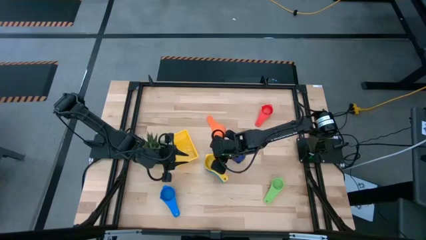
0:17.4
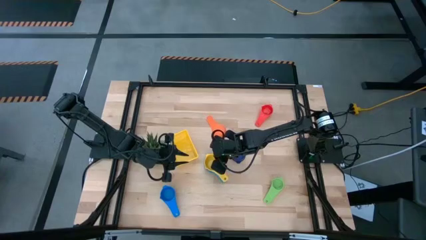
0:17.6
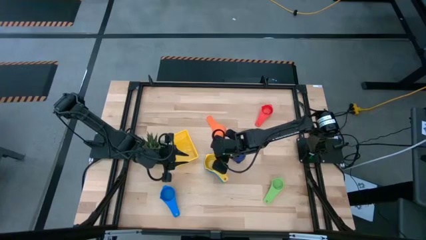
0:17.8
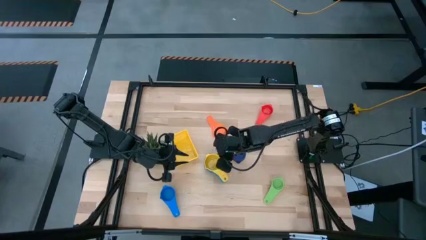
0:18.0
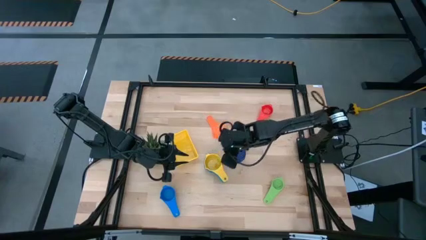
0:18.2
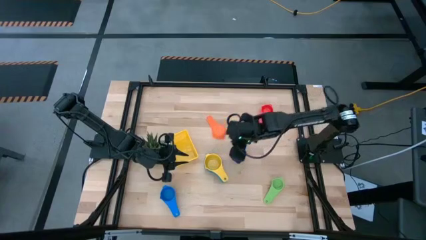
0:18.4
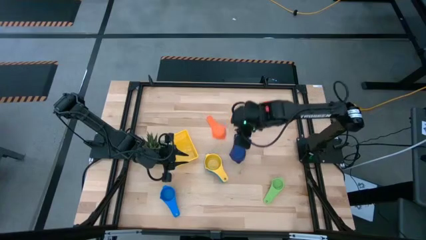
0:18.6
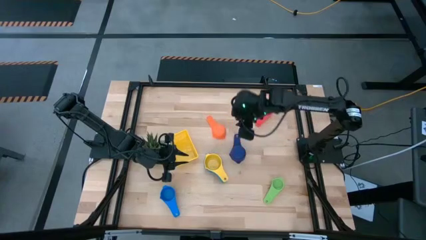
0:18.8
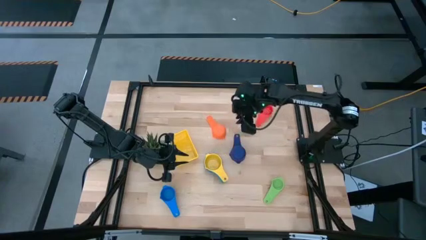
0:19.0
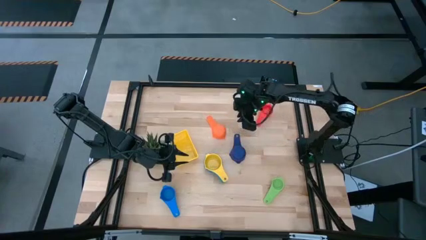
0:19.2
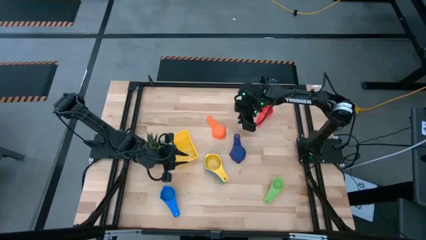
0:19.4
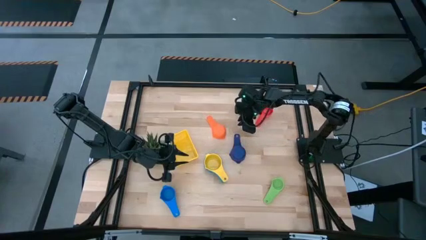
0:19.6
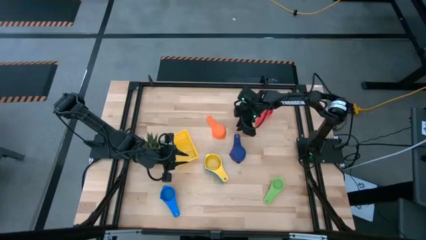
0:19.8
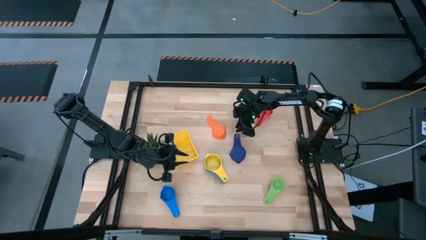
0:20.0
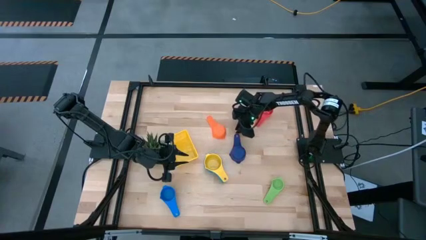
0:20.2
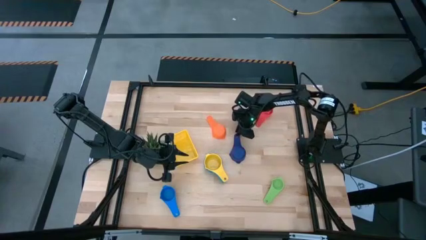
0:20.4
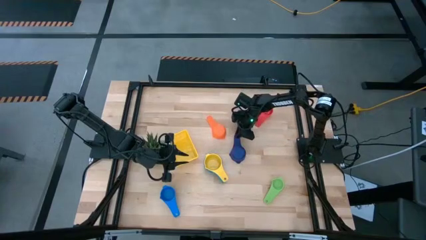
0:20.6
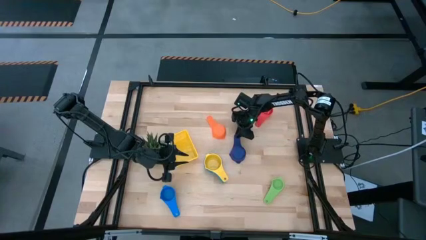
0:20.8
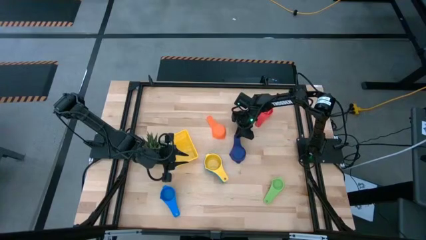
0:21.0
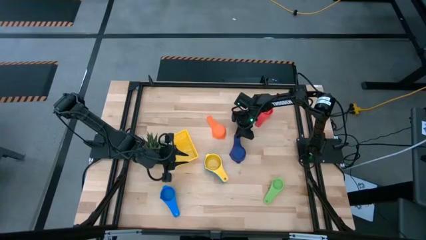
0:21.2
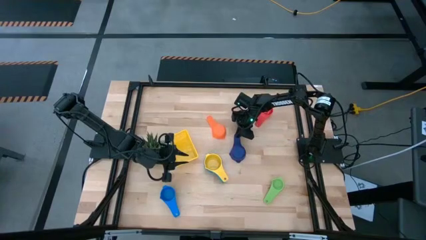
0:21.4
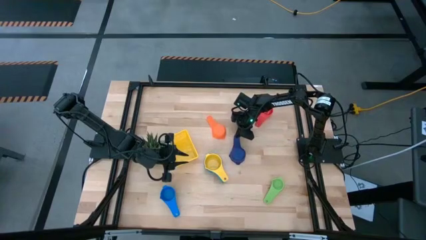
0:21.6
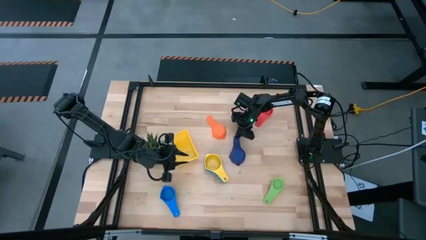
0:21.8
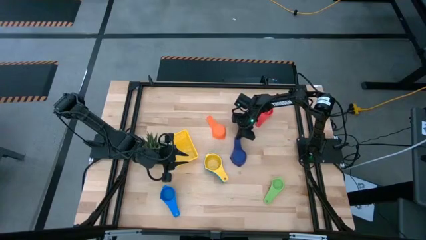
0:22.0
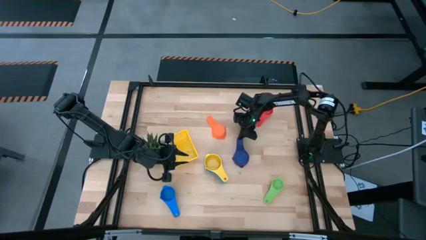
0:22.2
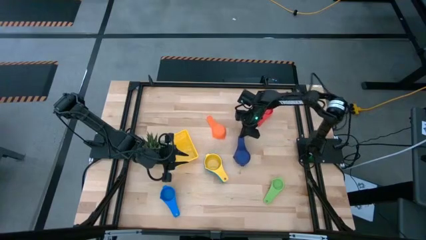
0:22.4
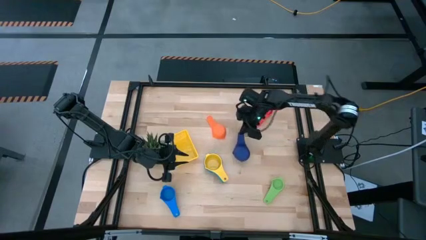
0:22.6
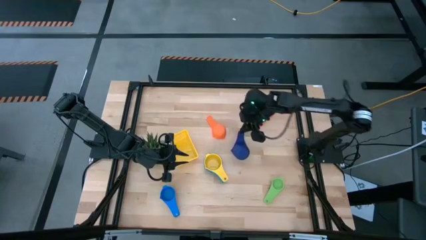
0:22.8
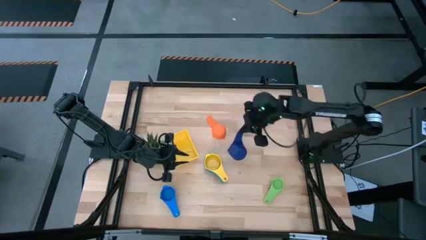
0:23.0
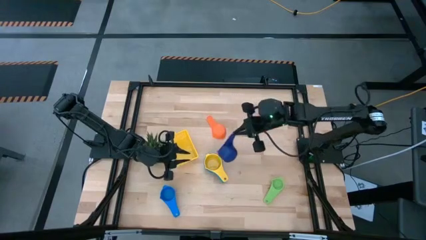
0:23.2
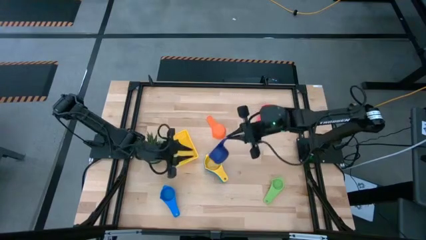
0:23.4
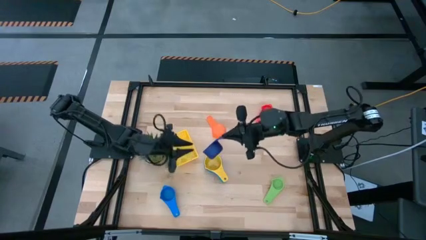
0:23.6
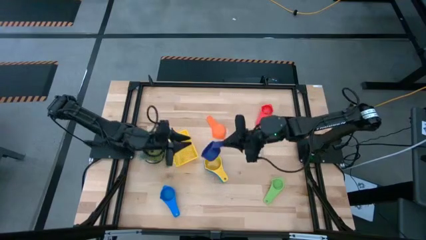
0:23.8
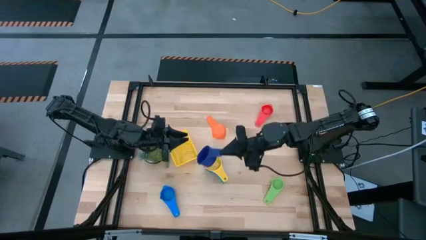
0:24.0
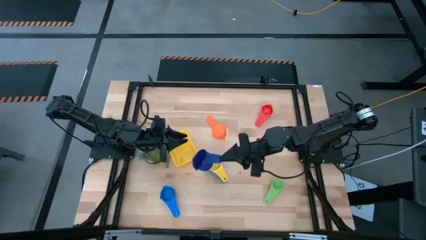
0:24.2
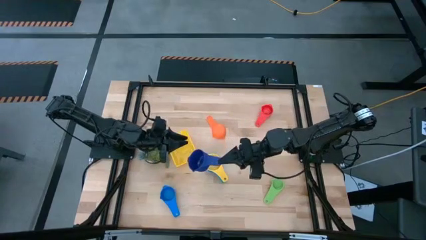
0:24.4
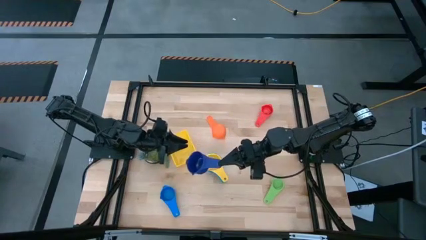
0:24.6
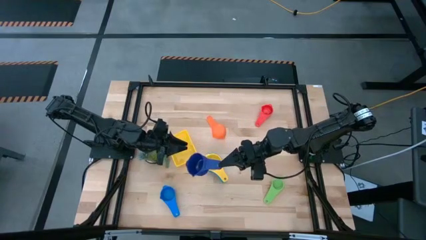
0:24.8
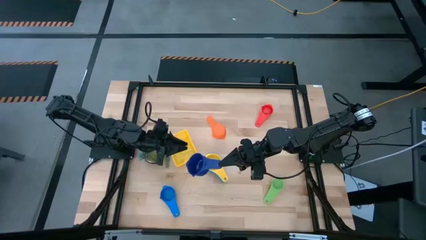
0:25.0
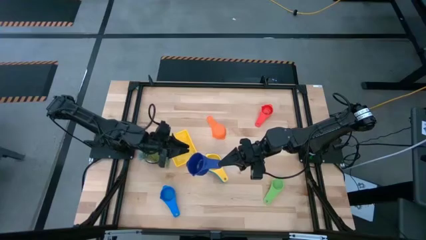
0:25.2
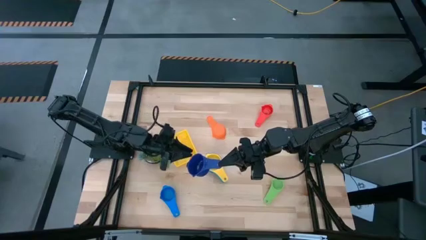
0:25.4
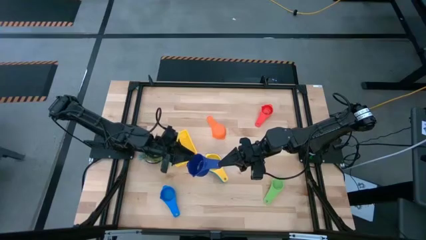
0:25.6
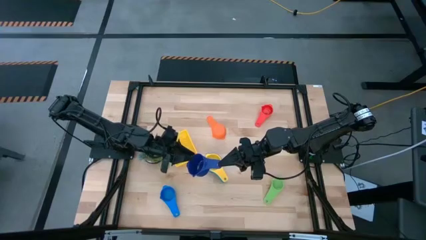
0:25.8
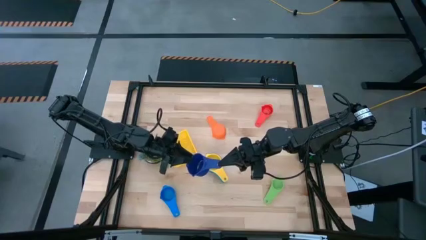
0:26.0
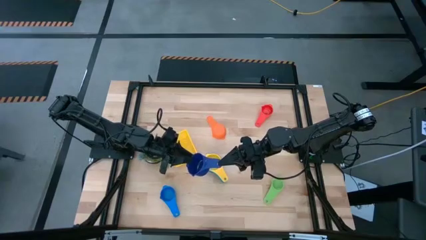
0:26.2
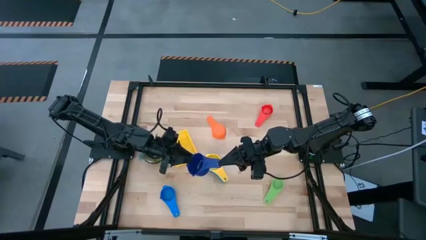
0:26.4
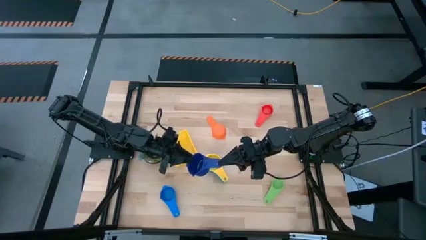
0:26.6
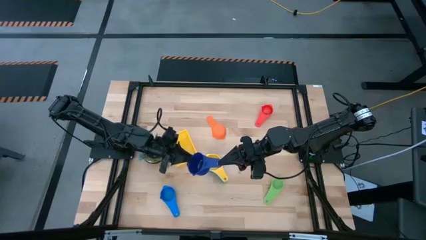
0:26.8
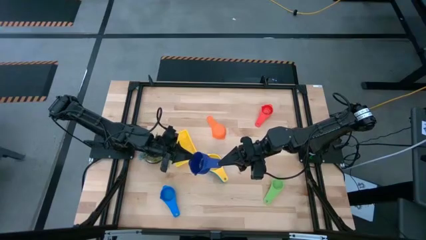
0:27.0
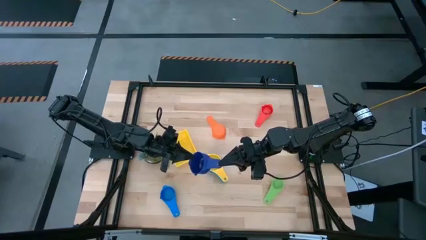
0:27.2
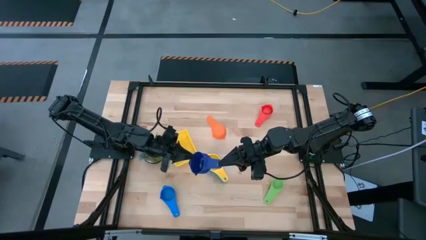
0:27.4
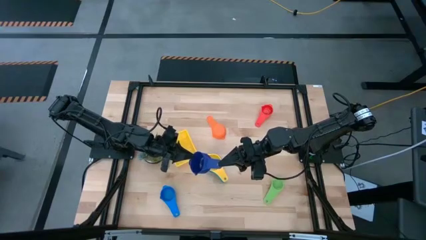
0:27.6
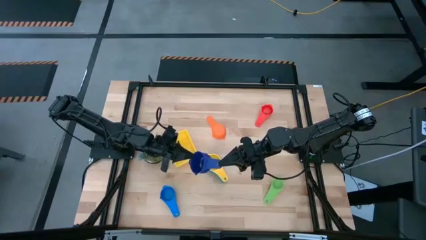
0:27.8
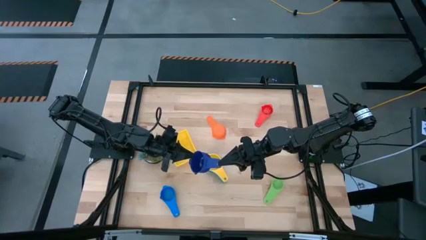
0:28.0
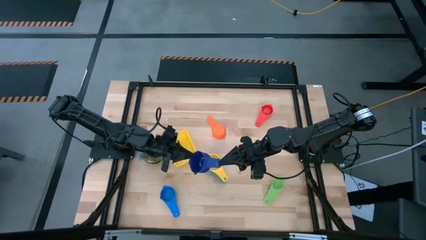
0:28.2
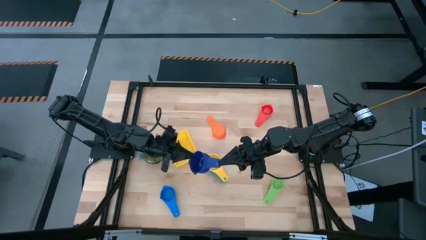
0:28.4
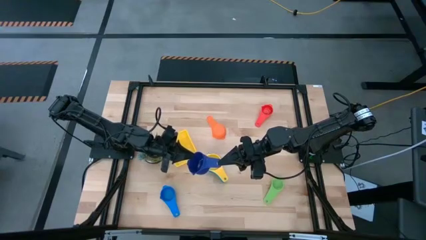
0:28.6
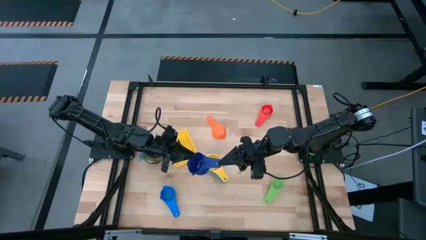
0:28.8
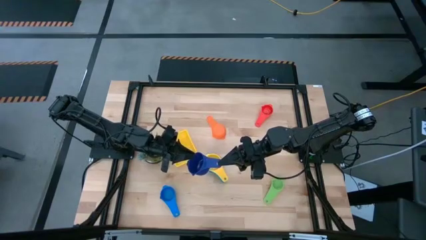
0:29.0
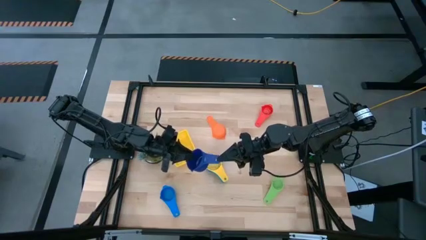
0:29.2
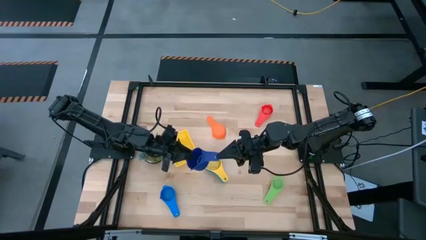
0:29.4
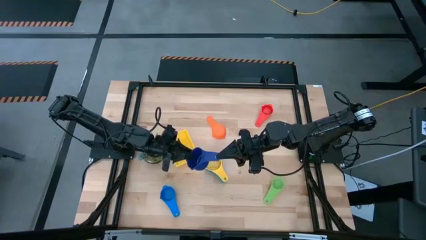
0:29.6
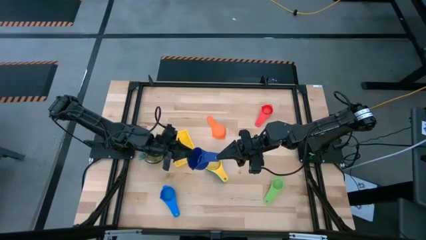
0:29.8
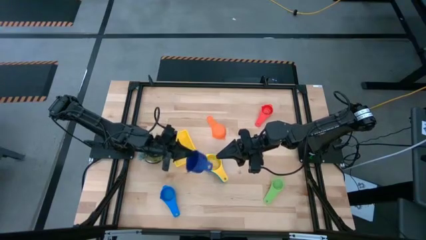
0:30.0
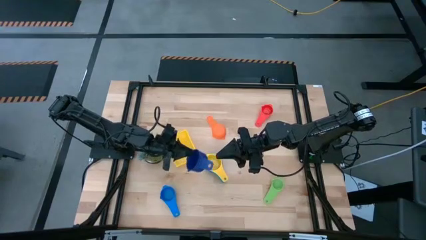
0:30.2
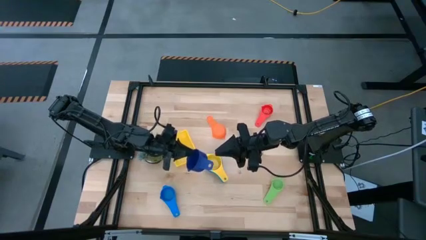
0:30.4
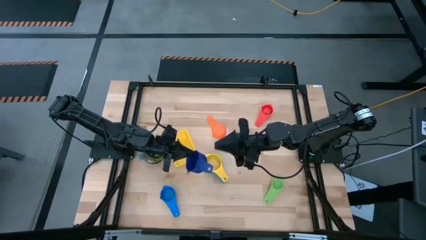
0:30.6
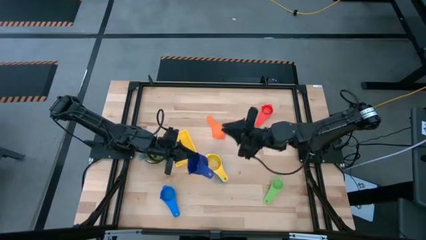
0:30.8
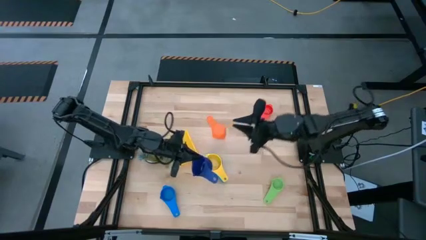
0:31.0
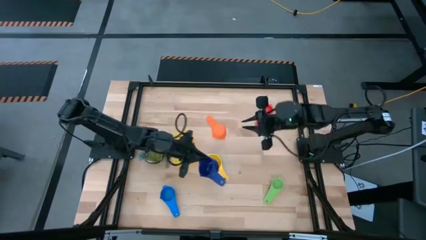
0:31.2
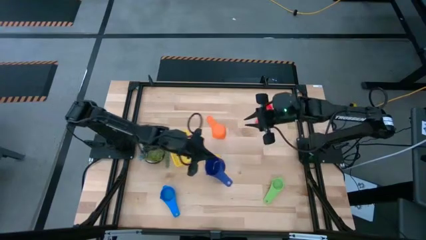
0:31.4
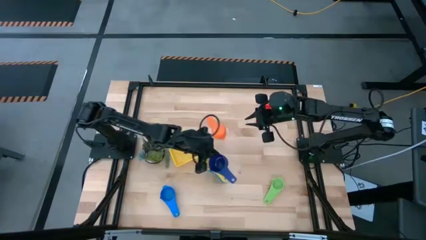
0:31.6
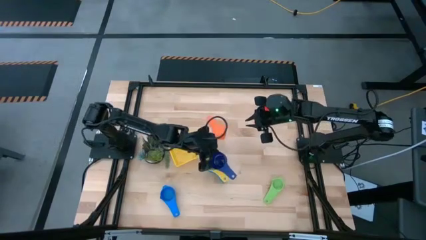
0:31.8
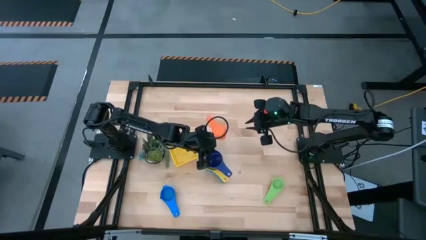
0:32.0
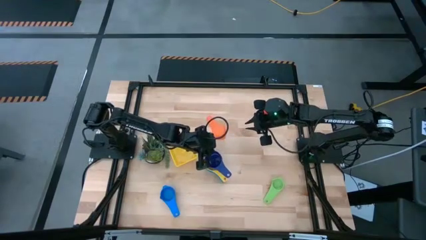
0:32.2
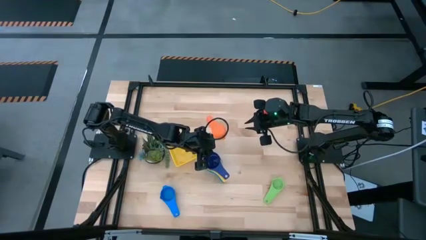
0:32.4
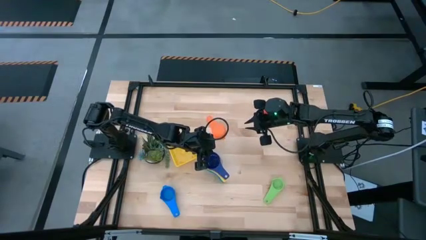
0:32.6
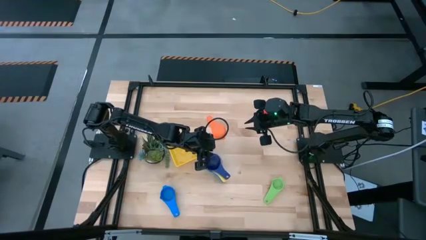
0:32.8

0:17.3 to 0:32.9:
Task: Nest measuring cups in basket
Stack the dark blue measuring cup on top of the yellow measuring cup

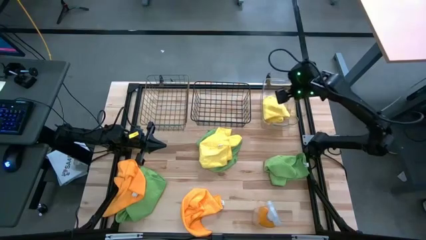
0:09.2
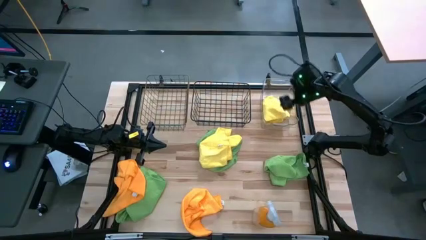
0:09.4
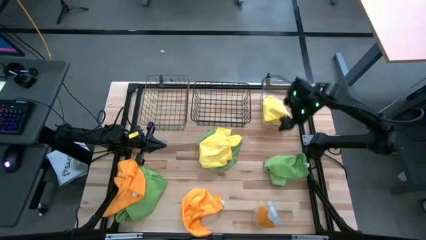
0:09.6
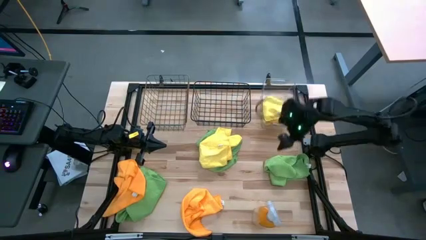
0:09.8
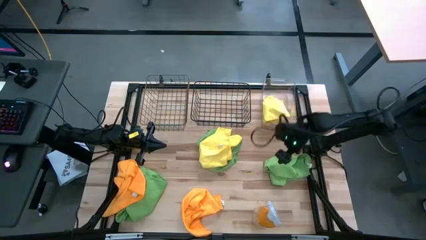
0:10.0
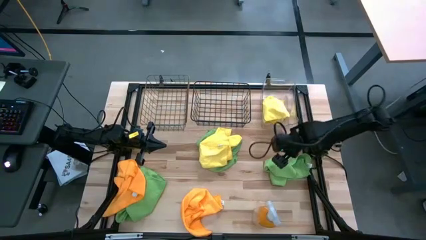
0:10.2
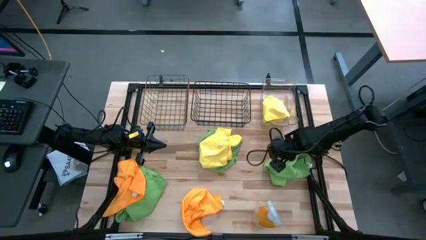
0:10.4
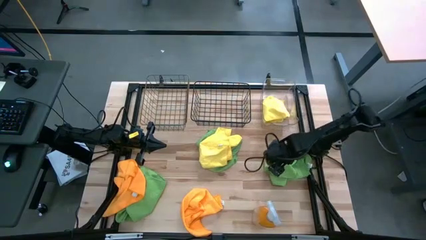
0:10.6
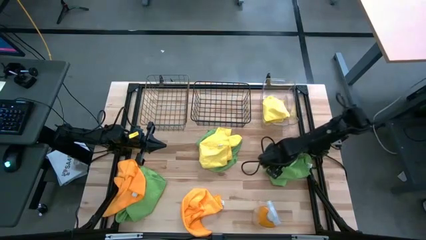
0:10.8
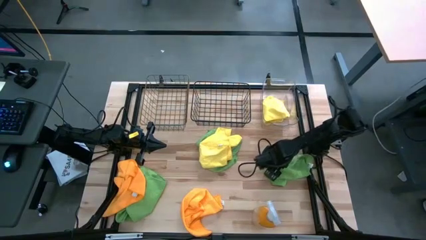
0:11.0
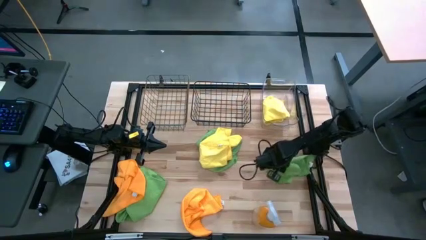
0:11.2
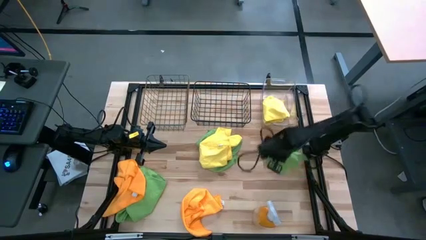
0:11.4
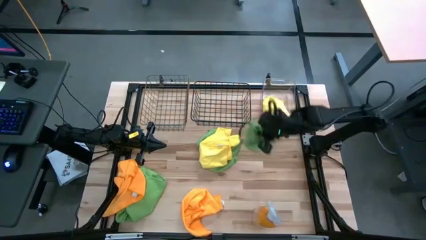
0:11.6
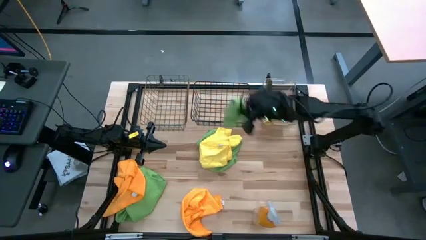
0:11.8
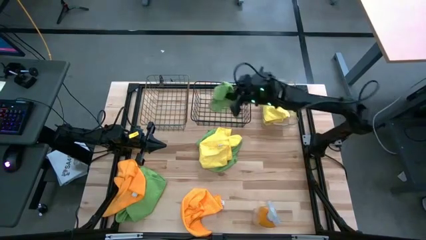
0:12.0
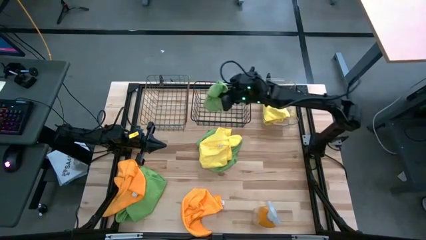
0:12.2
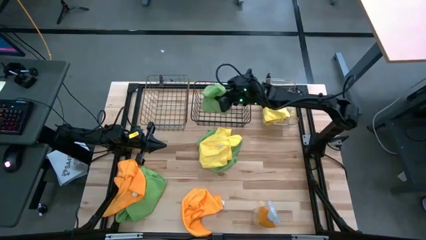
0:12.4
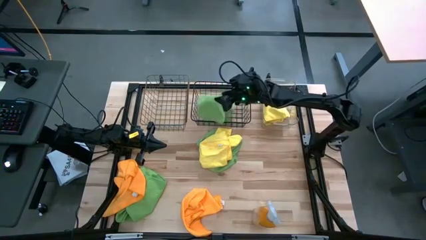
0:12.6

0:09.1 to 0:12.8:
Task: Sort microfiber towel by color & place in baskets
Put the right green microfiber towel into the black wire basket
